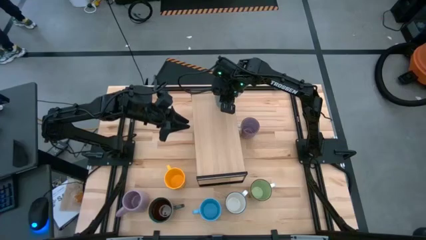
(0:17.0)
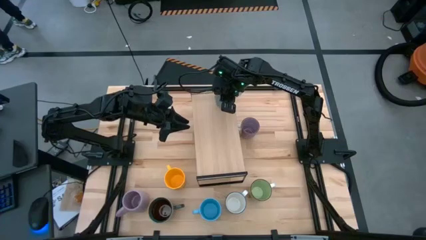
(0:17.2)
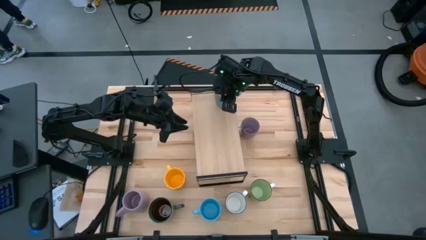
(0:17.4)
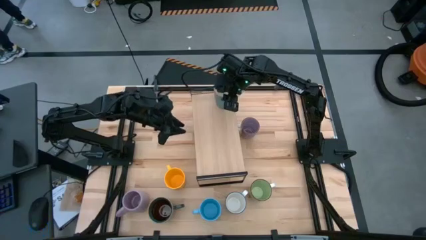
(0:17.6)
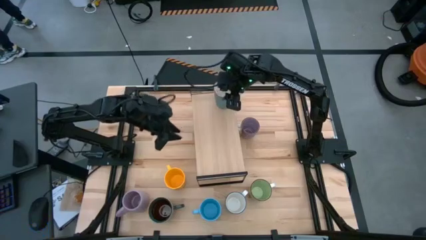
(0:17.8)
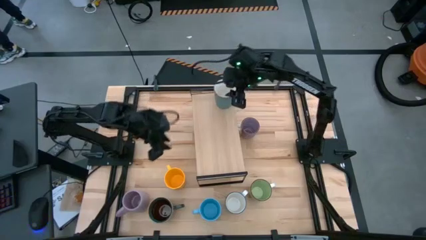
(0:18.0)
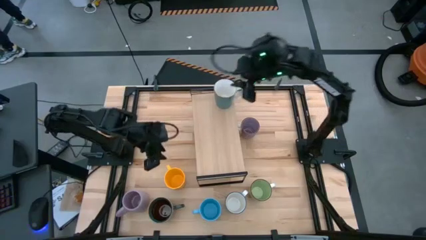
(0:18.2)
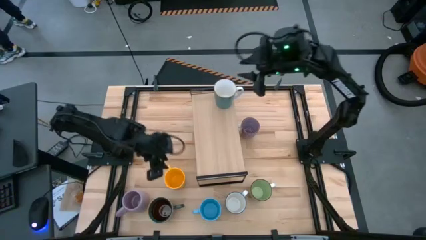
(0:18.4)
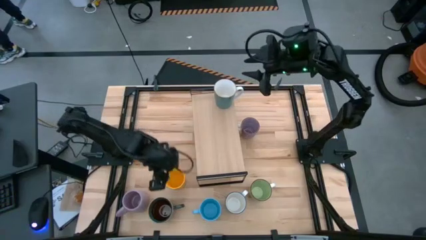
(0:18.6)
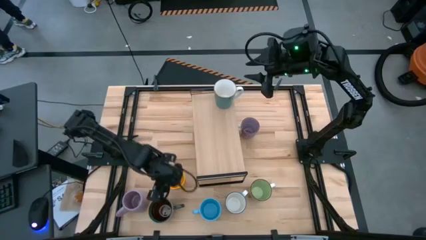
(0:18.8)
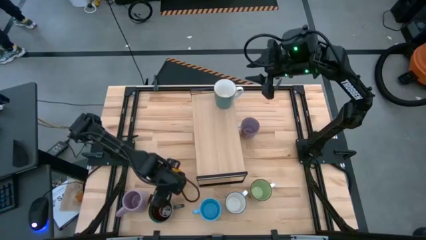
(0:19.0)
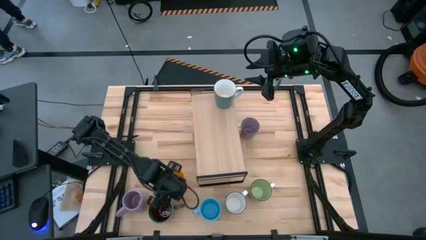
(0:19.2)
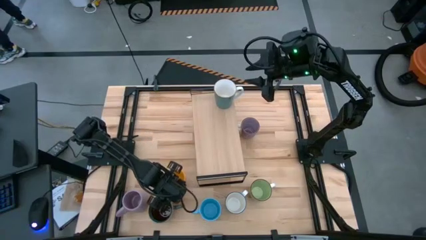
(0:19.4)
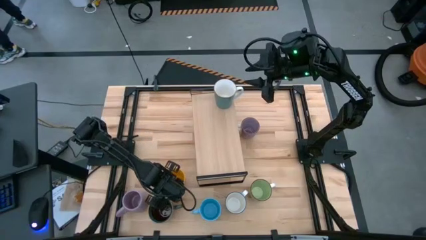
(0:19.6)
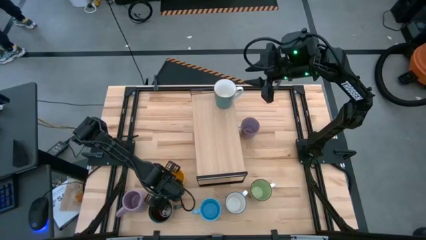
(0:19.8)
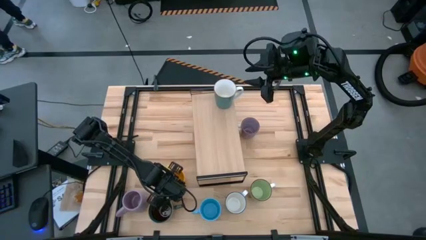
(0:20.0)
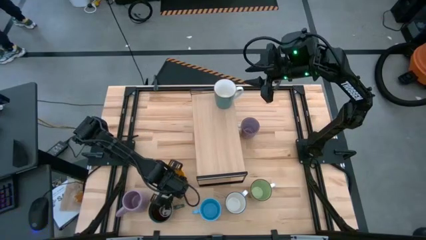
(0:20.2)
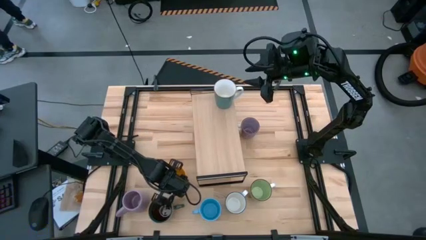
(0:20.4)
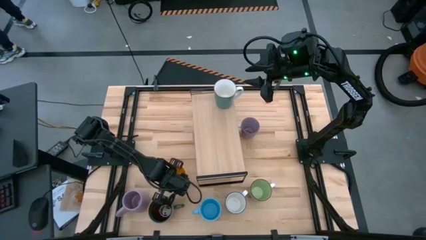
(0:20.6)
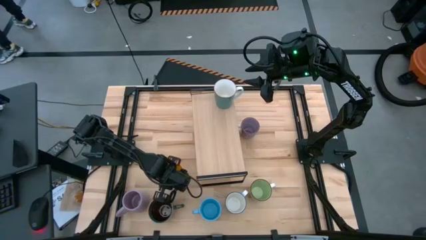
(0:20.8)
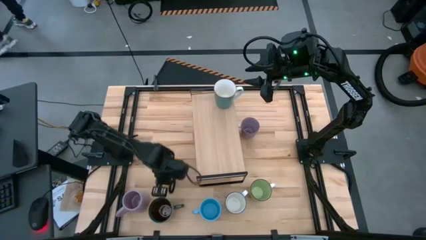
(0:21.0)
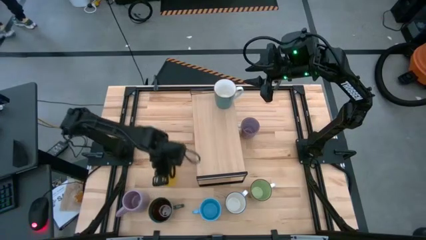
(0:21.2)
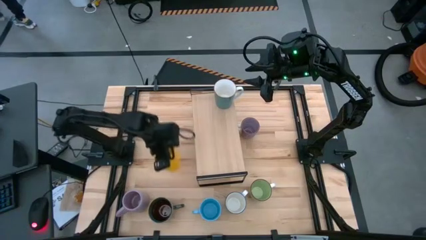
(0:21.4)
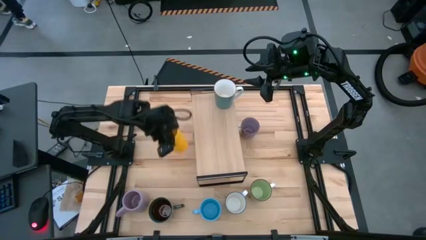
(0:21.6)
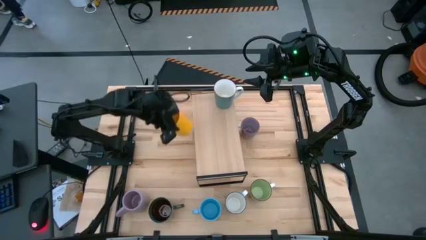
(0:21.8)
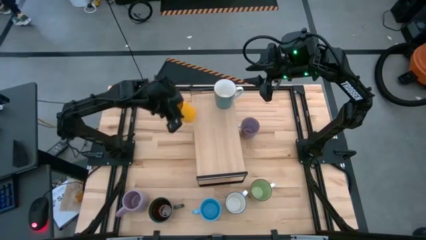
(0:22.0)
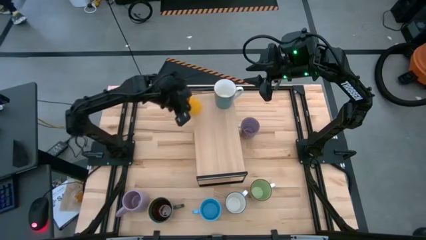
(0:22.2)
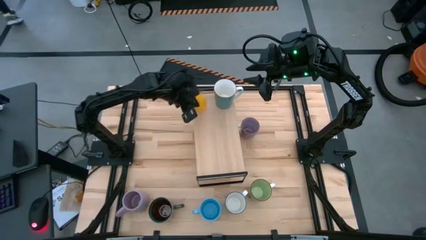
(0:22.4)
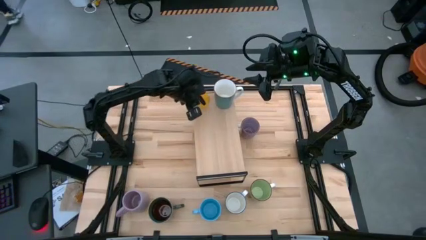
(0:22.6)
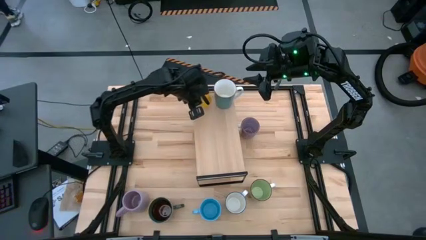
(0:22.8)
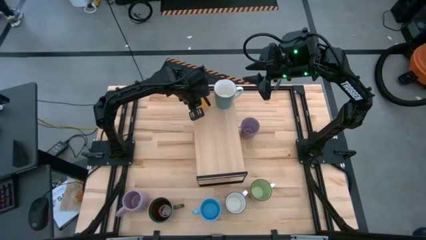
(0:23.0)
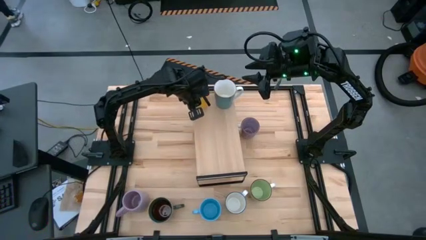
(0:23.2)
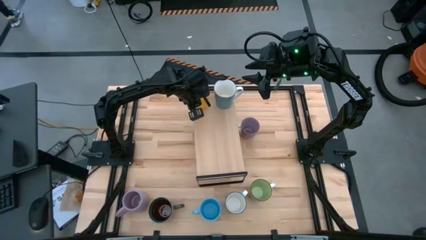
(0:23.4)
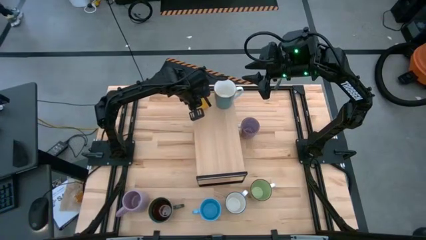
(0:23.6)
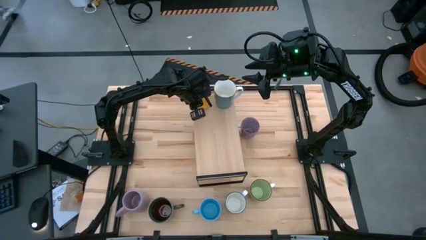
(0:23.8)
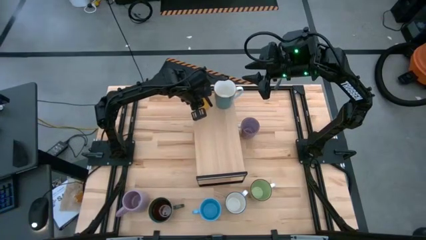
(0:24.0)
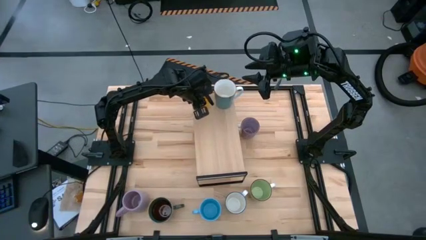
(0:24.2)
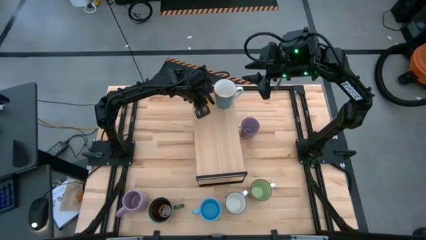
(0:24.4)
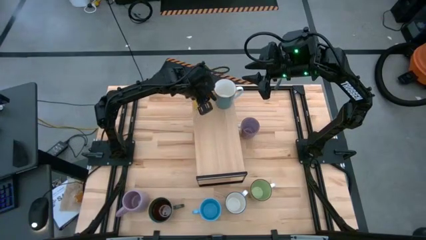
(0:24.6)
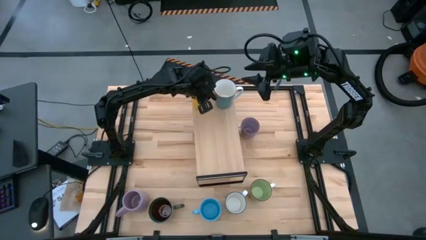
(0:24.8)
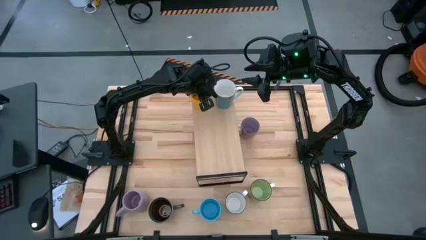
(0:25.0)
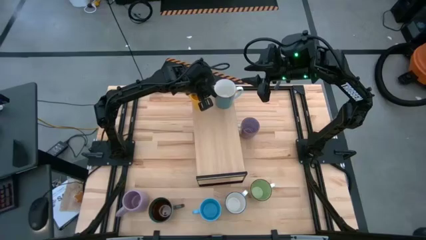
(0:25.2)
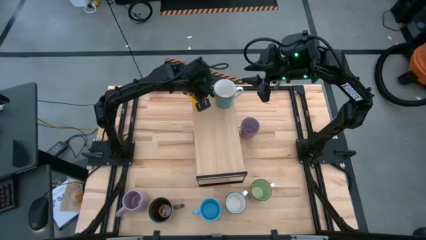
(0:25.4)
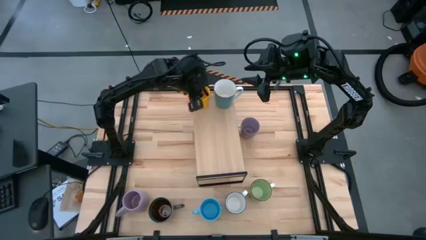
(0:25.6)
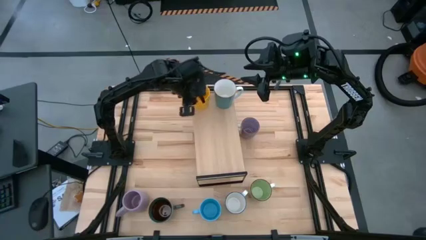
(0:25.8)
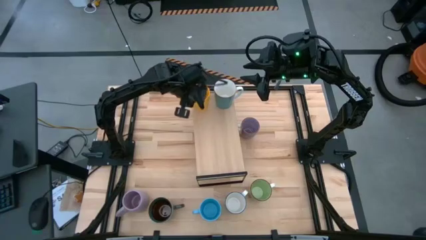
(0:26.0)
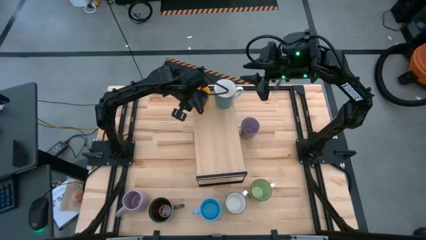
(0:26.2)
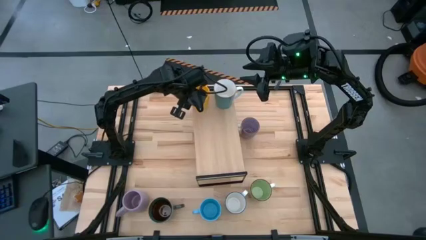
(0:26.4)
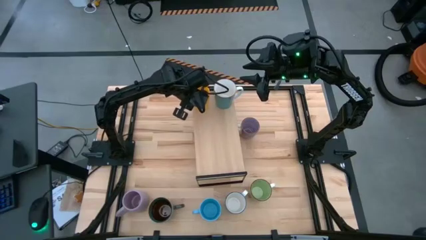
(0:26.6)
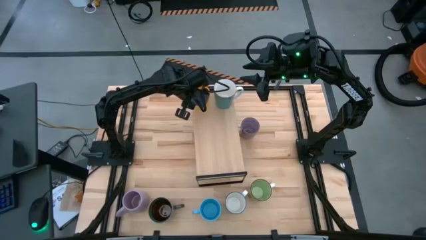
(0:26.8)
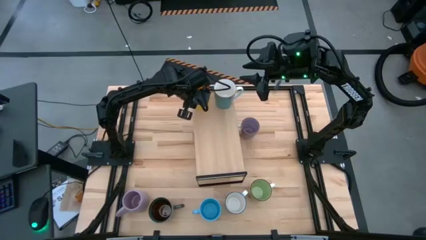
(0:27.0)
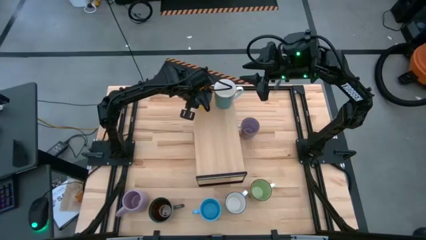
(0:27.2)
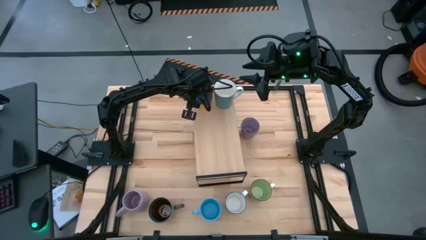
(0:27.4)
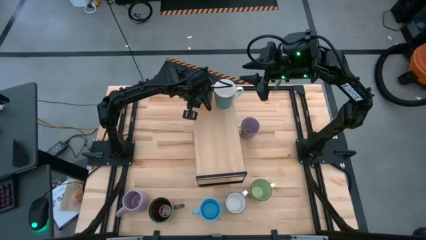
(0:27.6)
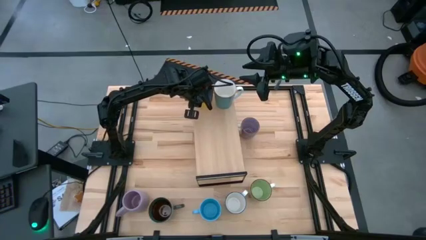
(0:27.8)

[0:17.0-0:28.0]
Task: Place coffee mugs
Put the yellow mug on the shelf

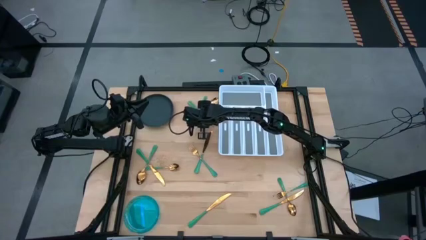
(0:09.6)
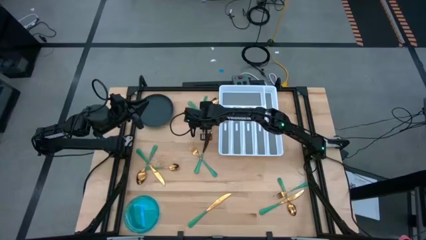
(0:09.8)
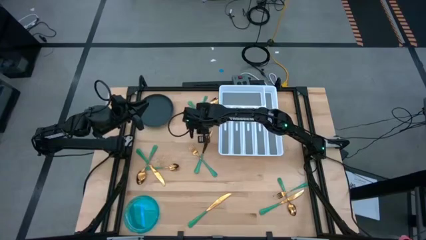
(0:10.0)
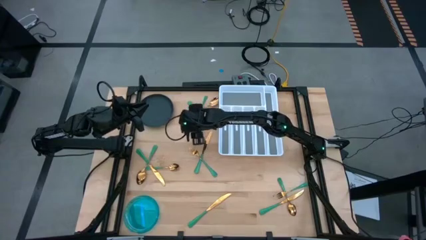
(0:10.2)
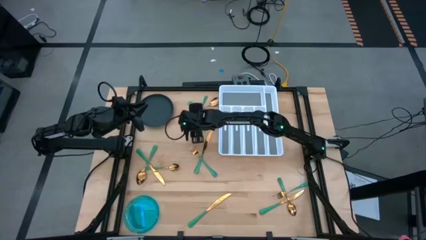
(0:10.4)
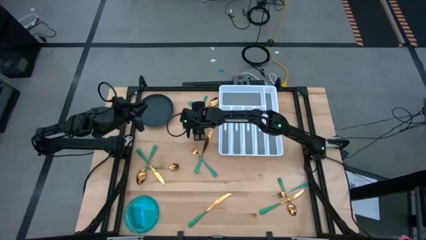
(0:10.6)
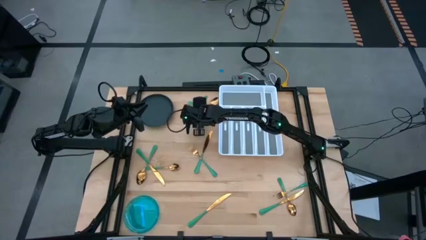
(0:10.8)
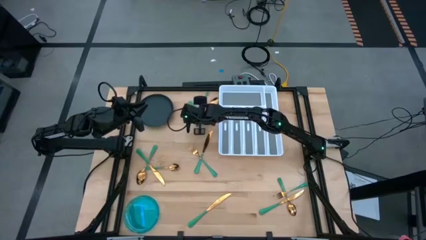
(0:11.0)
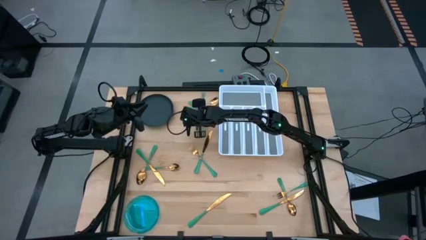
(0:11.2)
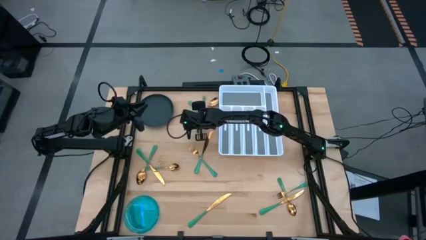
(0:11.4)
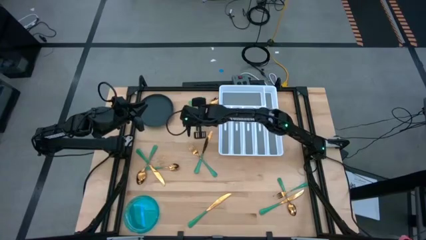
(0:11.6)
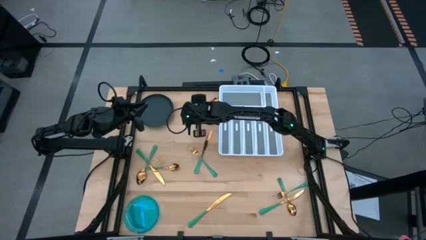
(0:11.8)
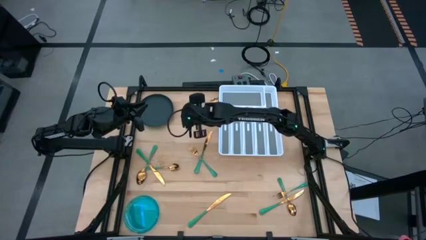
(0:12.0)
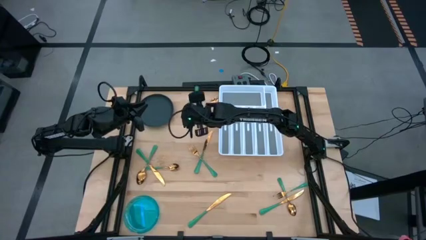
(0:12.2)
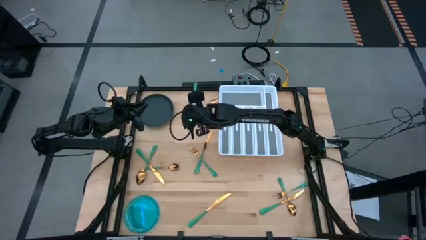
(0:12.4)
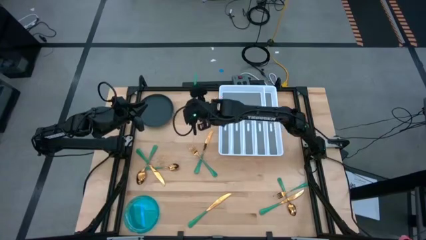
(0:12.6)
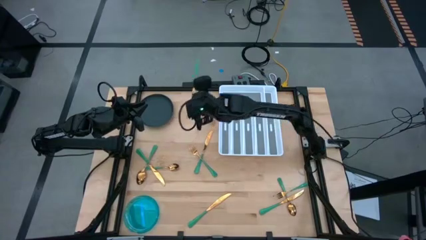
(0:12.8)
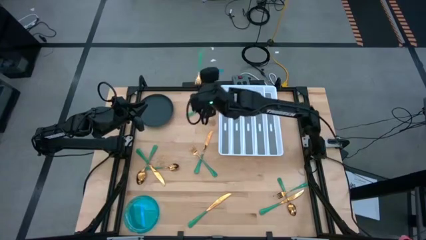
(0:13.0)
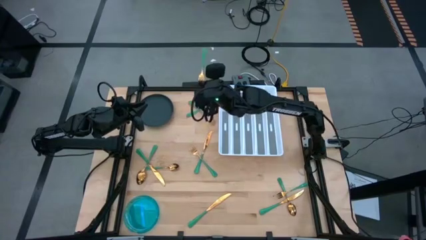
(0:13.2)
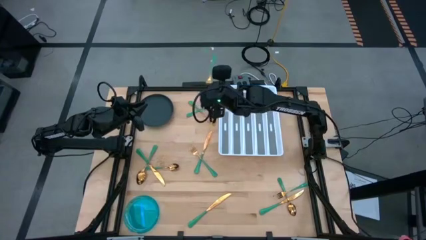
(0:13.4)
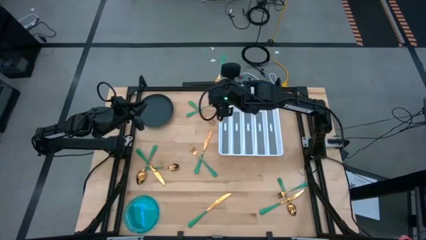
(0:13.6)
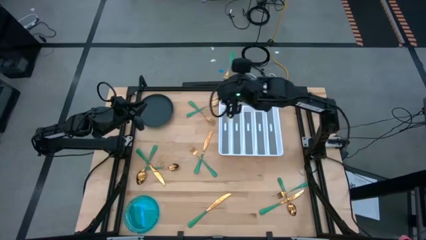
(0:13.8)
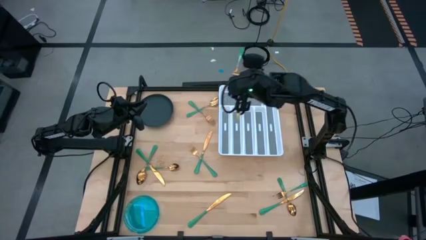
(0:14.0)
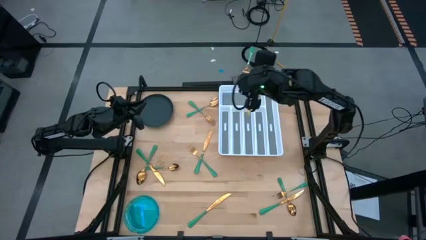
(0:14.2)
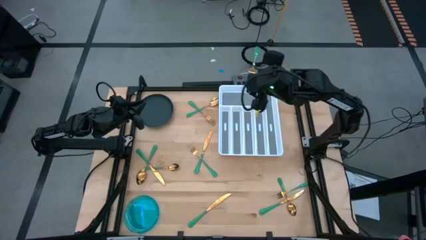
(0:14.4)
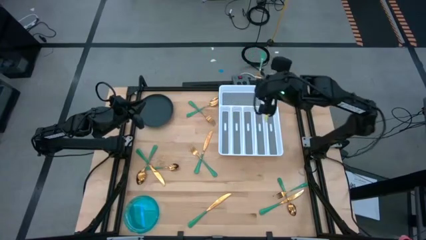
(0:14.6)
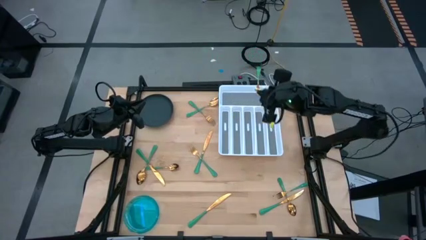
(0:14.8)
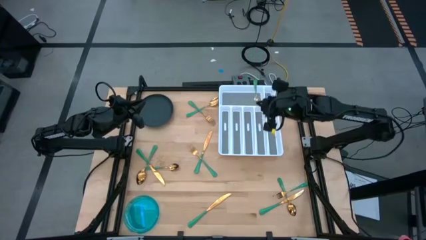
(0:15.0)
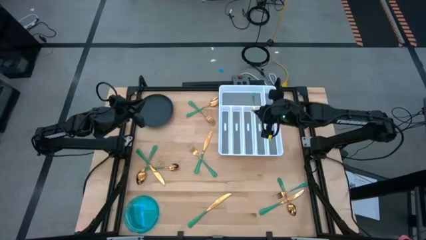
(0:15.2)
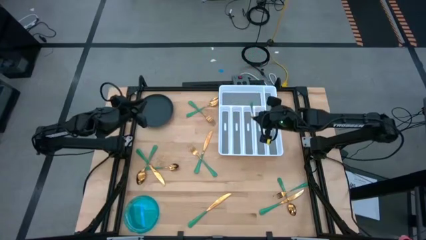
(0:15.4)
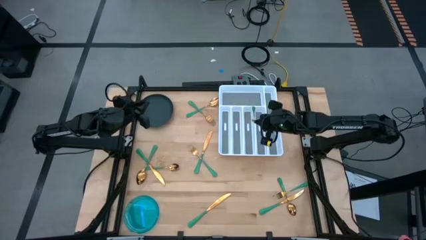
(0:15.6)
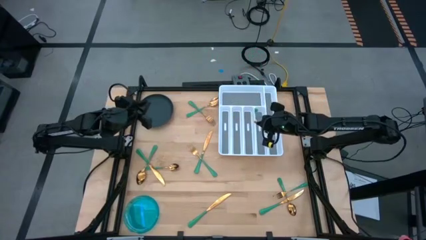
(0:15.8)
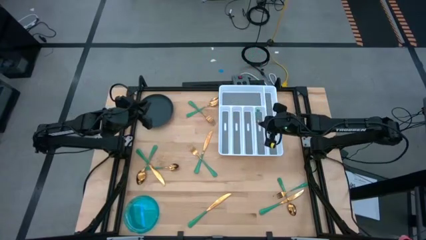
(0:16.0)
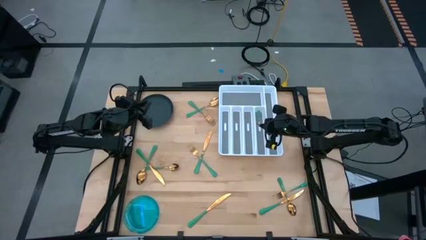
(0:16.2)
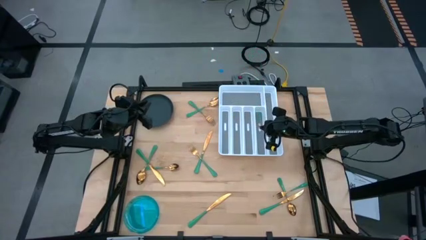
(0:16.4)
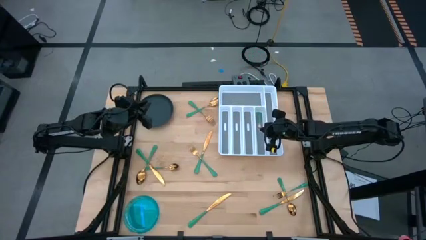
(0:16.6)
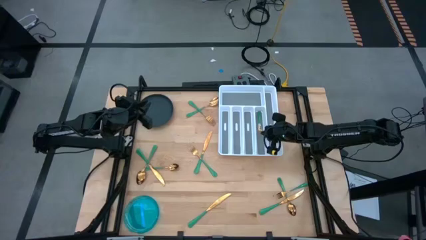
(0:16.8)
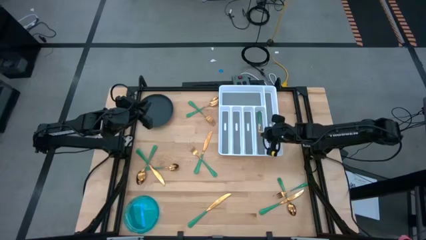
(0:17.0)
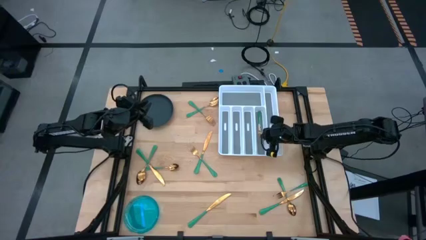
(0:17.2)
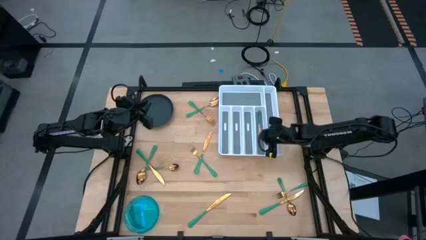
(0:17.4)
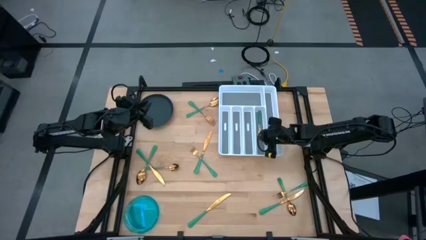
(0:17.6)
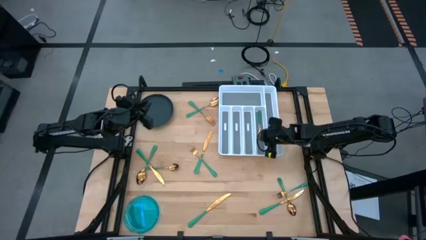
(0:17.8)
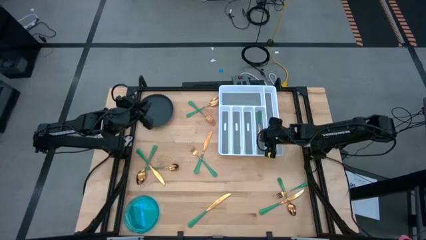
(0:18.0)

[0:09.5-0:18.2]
Task: Sort silverware
Put the green fork into the silverware tray
